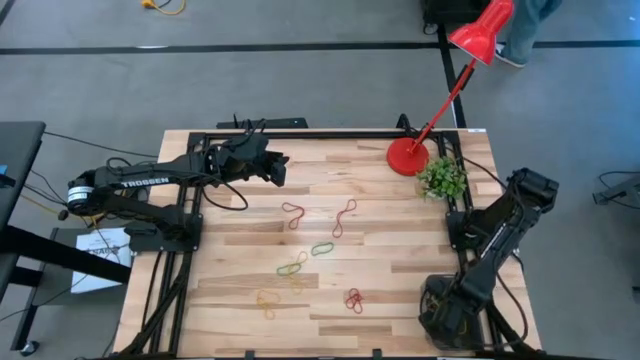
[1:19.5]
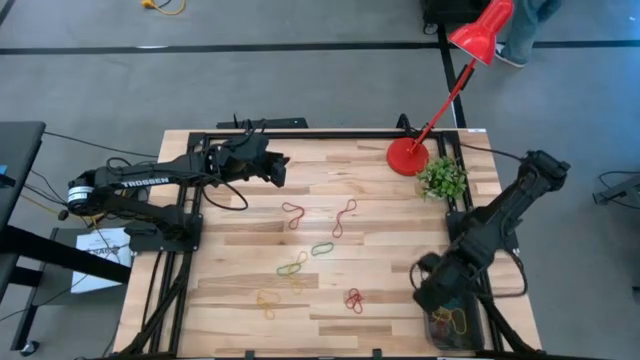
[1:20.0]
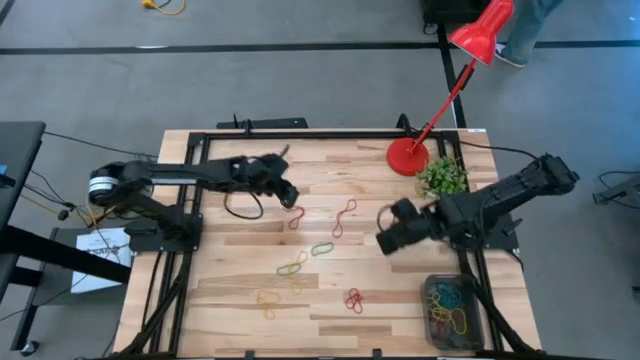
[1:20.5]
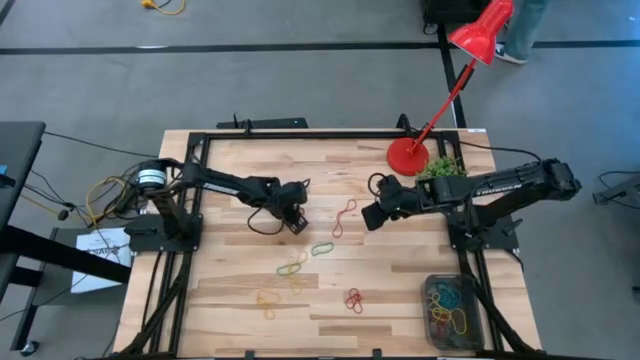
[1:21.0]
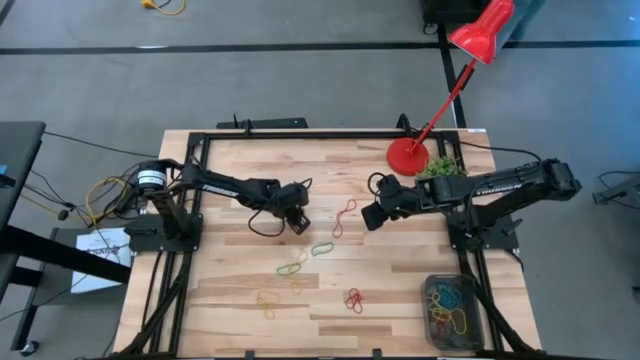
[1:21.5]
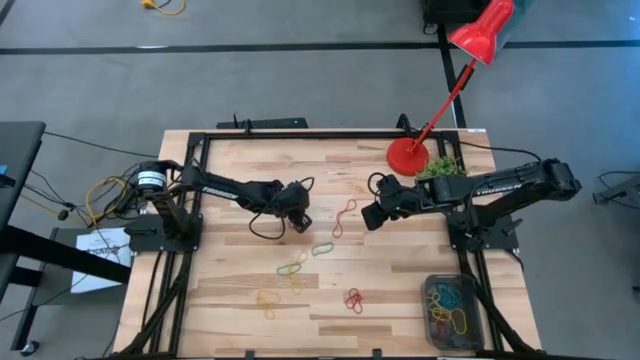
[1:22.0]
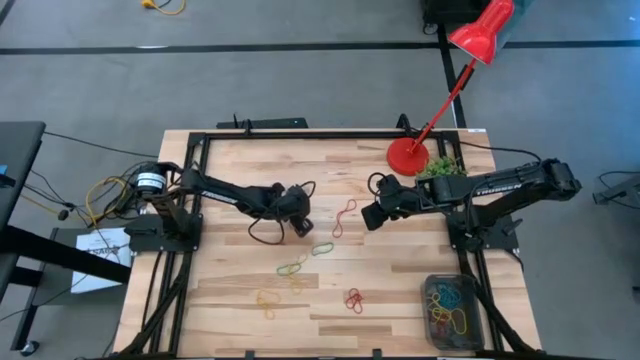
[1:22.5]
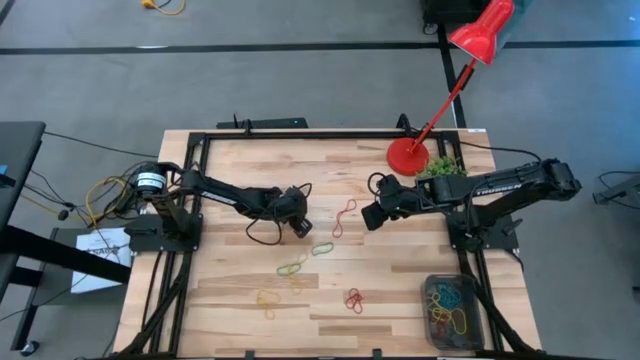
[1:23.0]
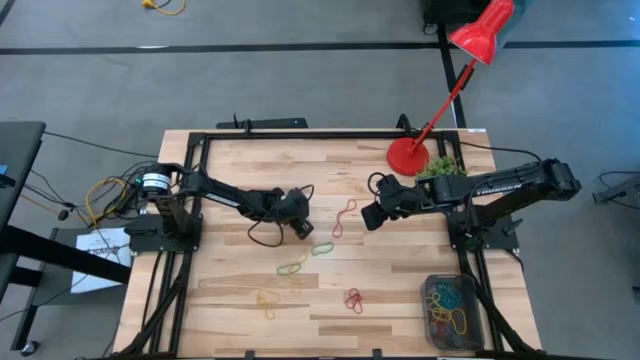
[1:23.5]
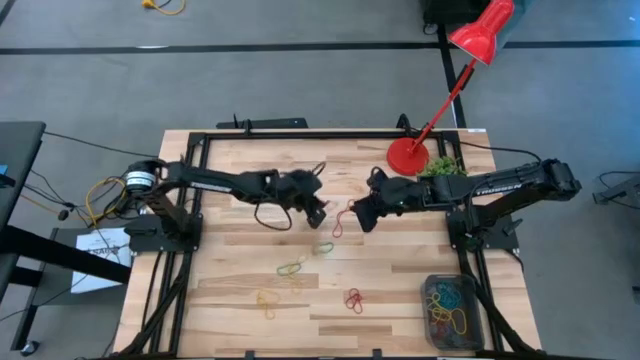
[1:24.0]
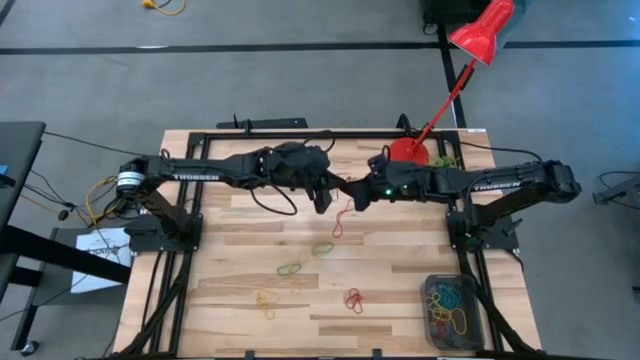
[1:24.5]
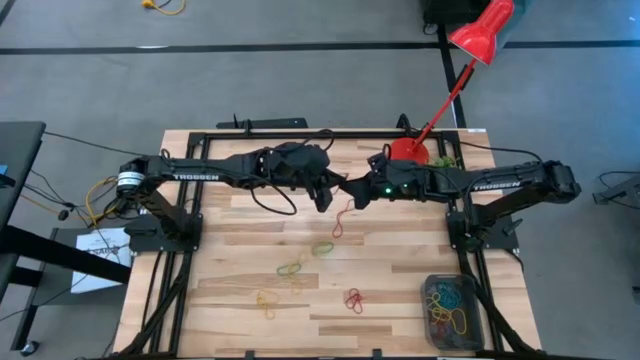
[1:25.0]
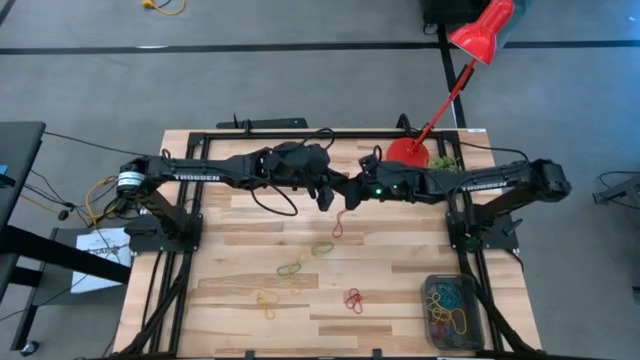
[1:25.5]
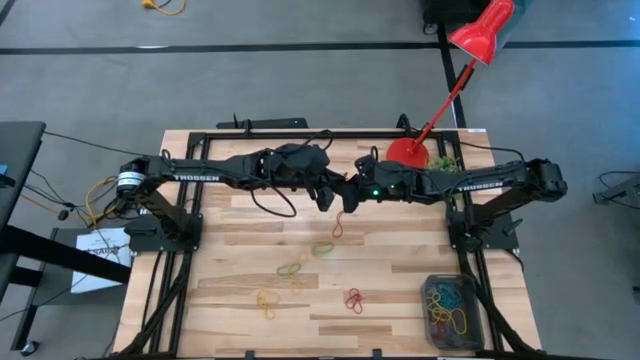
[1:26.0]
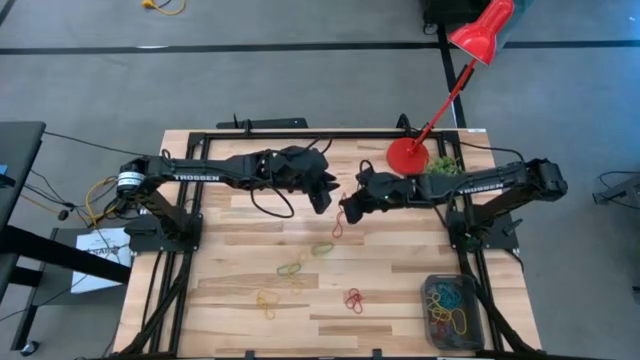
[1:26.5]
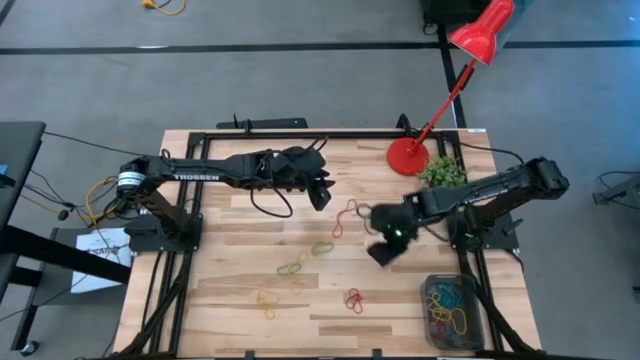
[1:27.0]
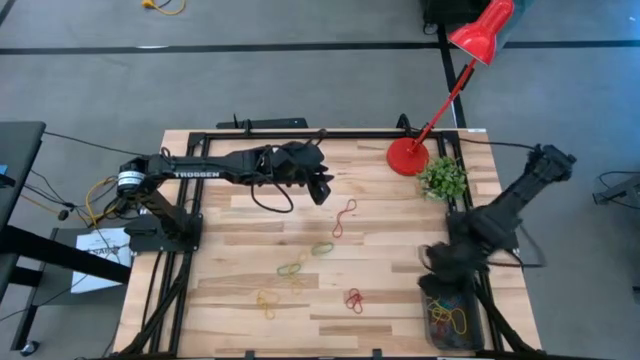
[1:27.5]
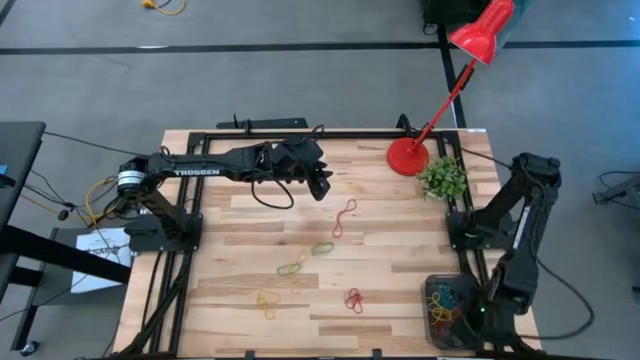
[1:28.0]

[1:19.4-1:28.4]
Task: Pick and place items into bin
Put the red rubber band into the black bin

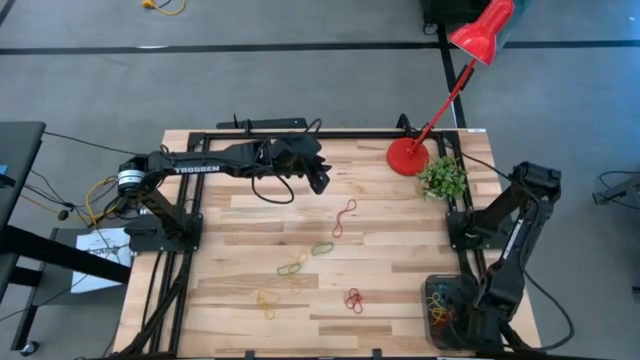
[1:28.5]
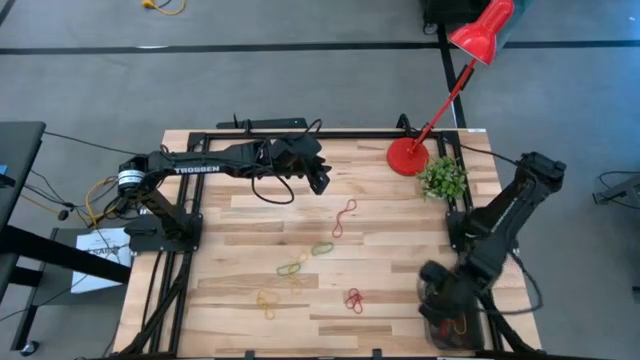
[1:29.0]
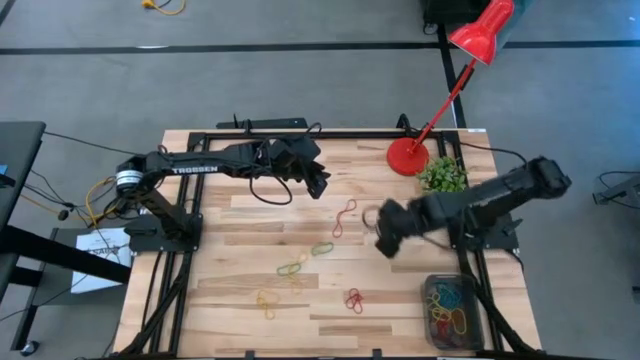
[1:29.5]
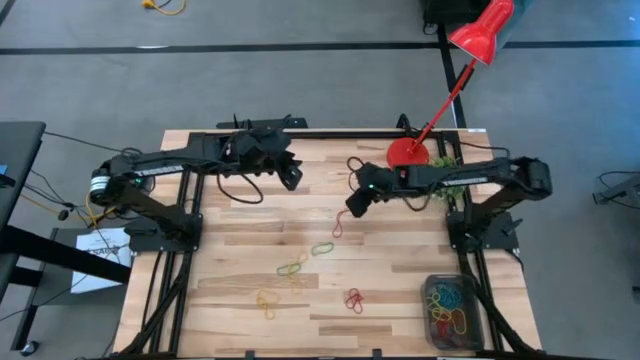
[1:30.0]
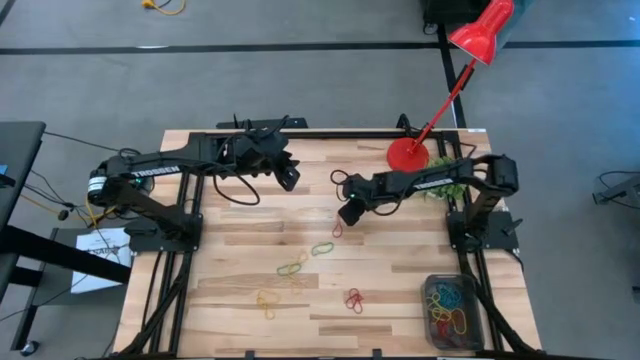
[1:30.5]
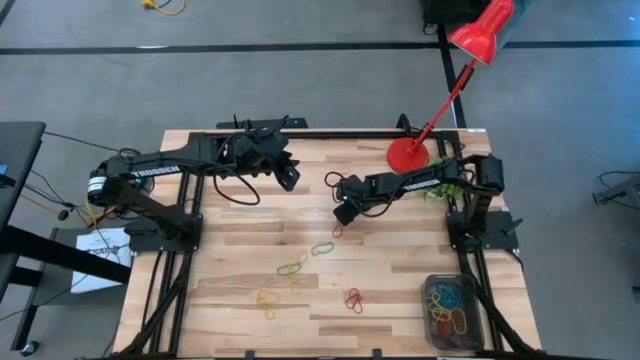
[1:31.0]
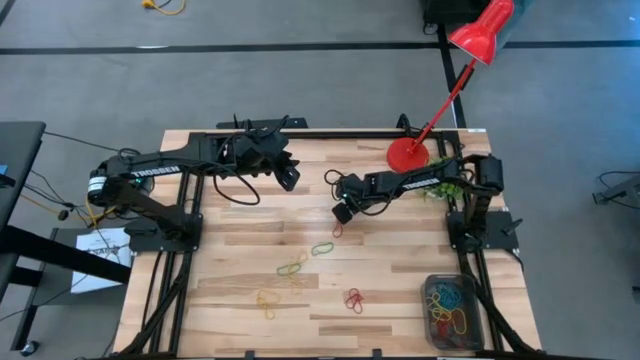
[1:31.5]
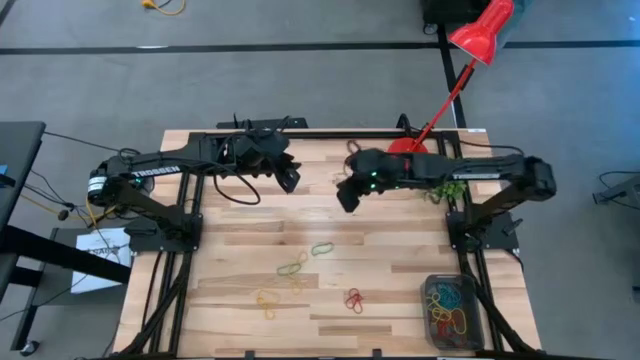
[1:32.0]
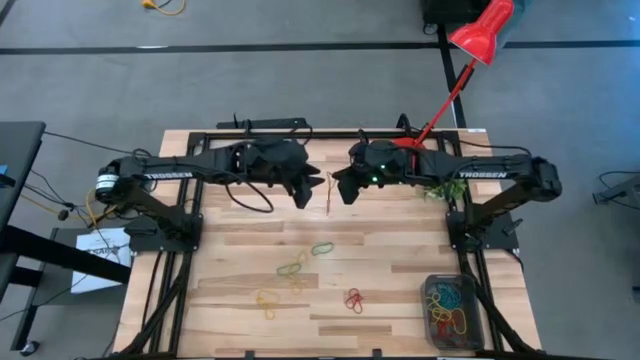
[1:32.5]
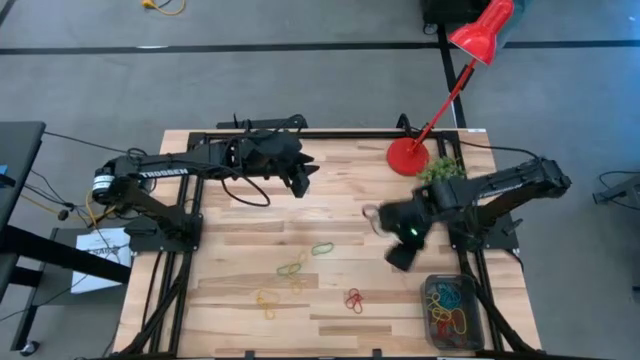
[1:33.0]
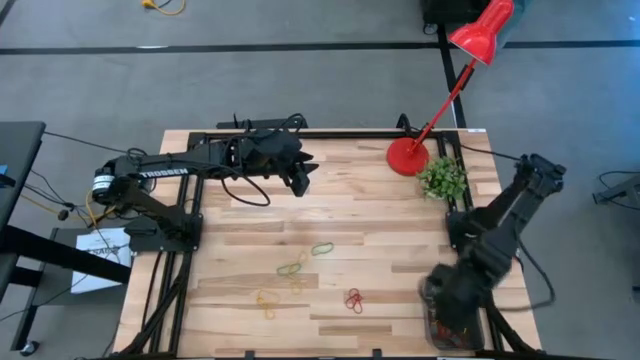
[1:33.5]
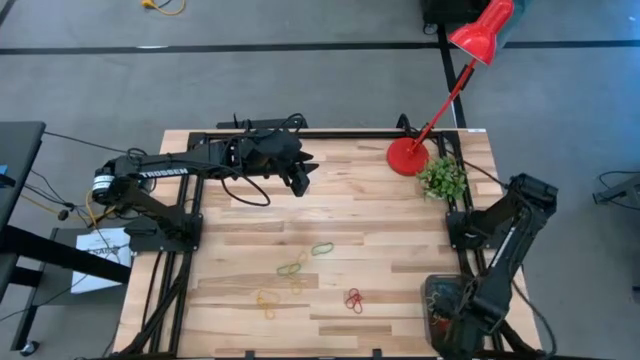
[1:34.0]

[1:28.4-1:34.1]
Put the red rubber band into the black bin

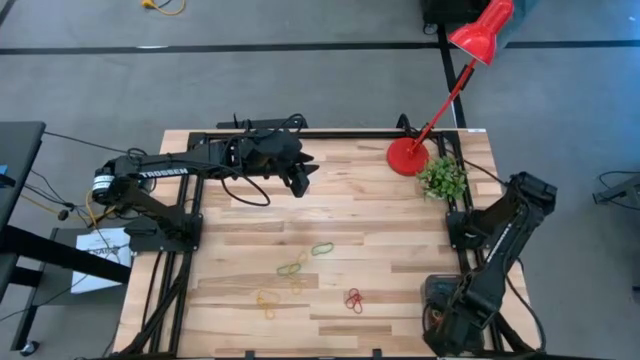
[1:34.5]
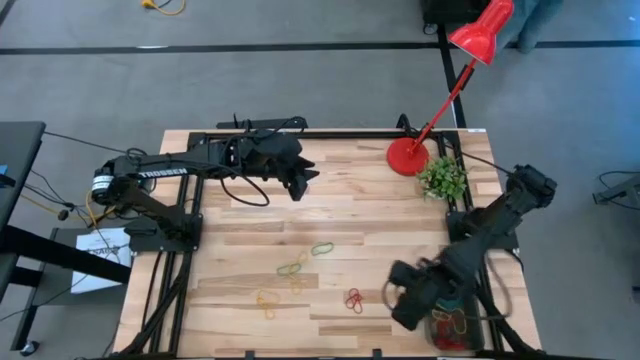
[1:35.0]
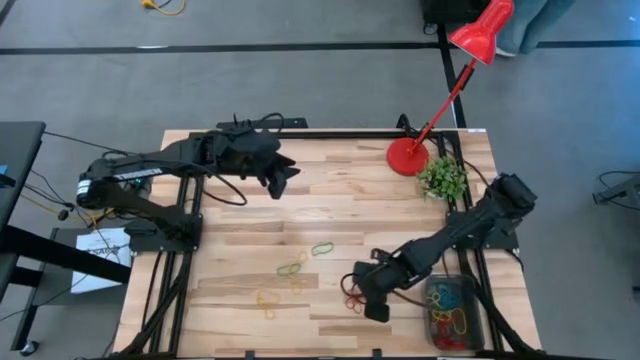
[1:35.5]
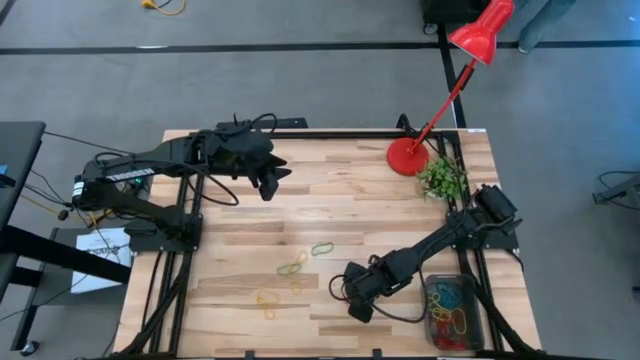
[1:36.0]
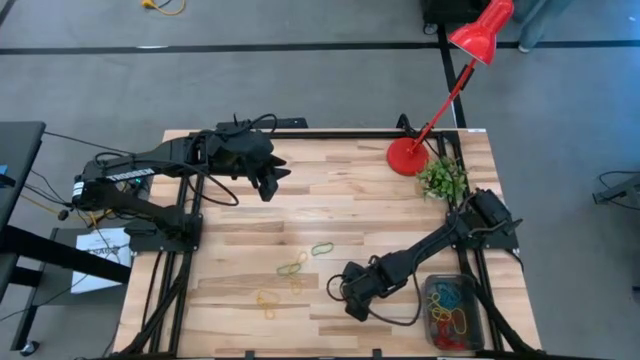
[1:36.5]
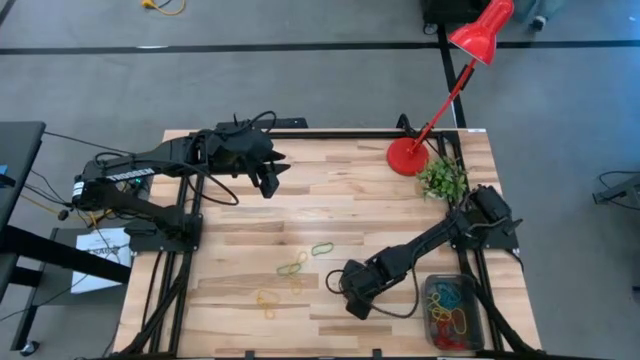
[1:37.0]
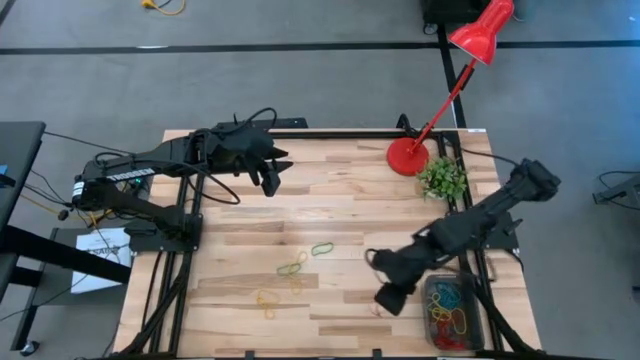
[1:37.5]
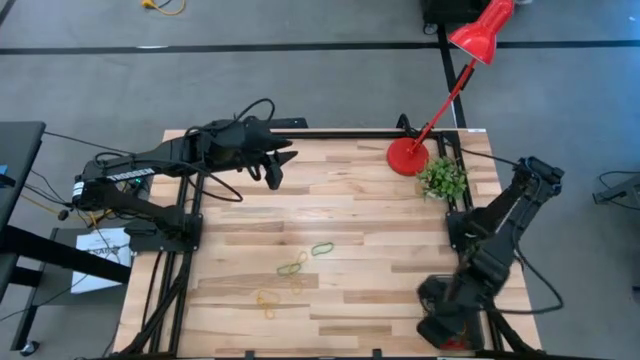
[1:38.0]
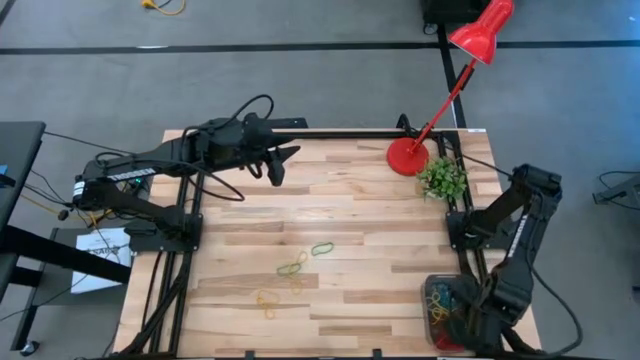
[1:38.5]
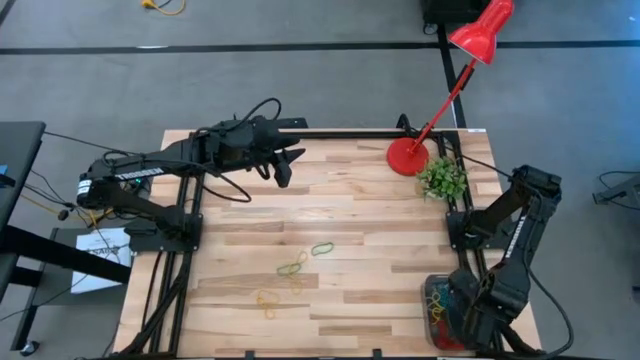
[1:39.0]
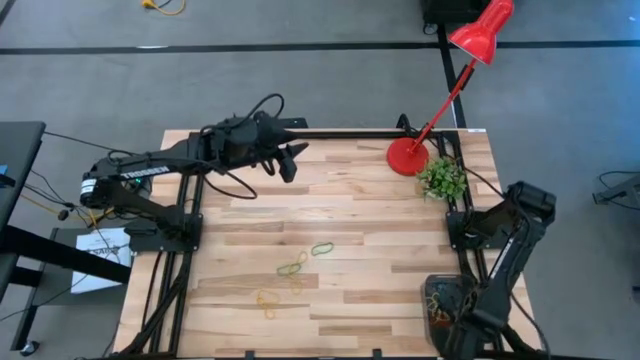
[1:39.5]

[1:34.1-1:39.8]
Put the red rubber band into the black bin
